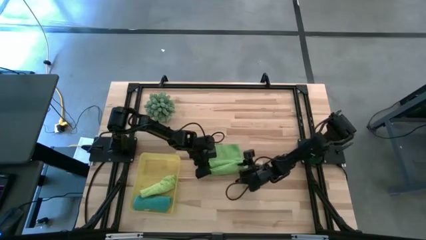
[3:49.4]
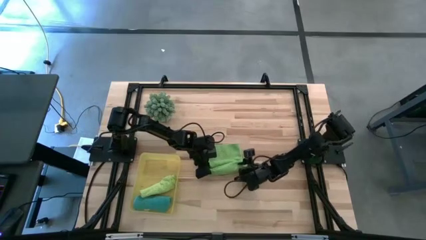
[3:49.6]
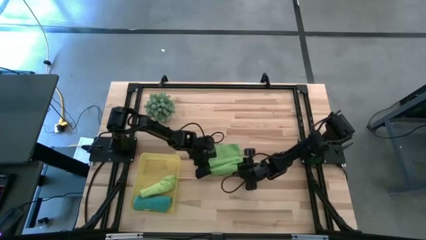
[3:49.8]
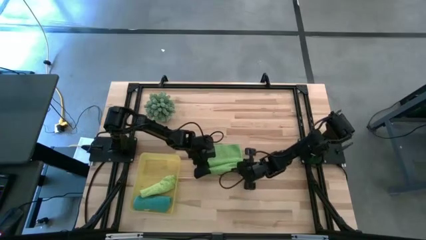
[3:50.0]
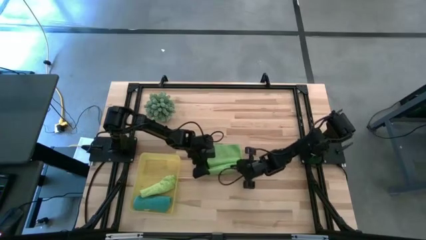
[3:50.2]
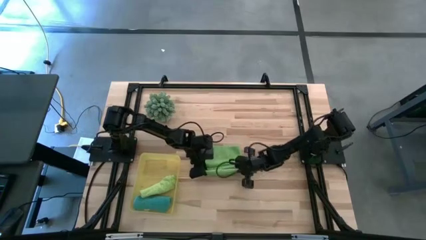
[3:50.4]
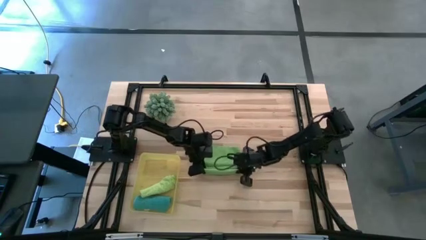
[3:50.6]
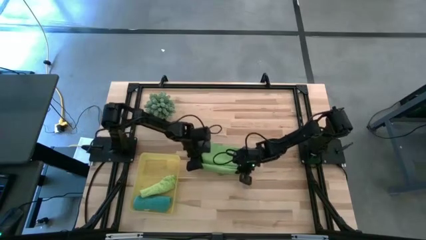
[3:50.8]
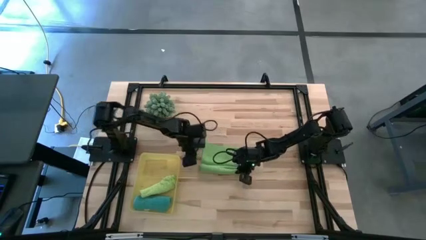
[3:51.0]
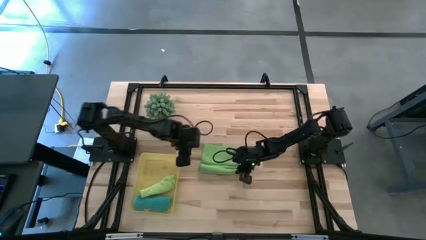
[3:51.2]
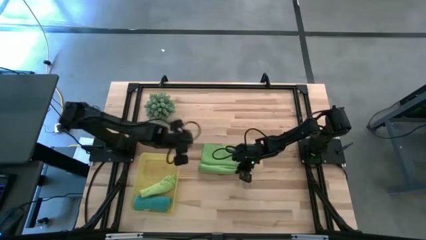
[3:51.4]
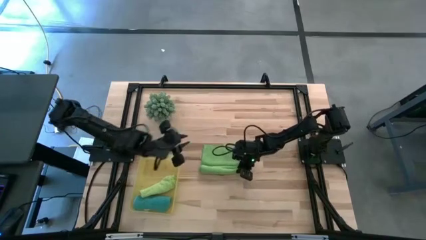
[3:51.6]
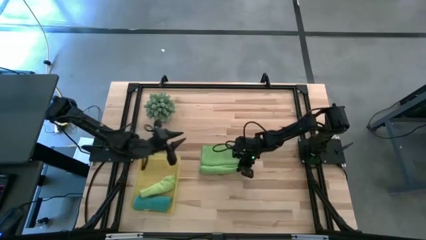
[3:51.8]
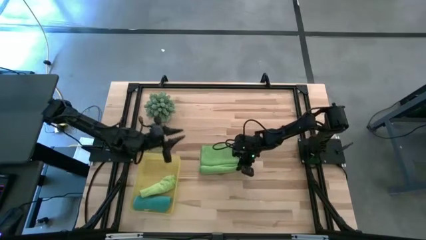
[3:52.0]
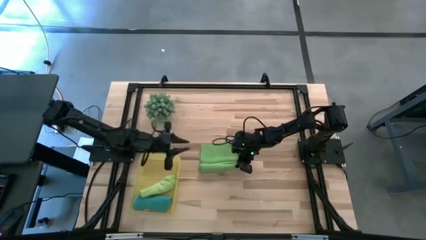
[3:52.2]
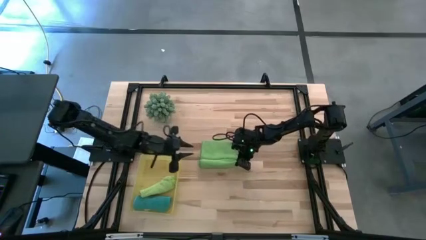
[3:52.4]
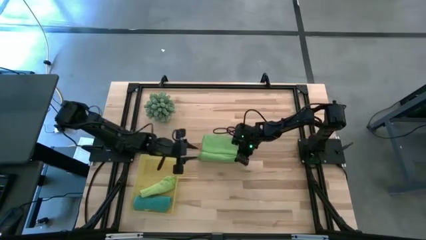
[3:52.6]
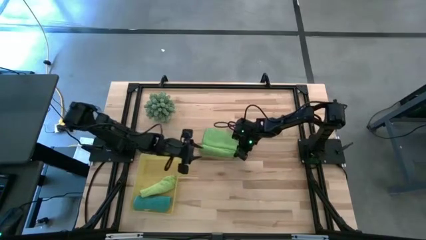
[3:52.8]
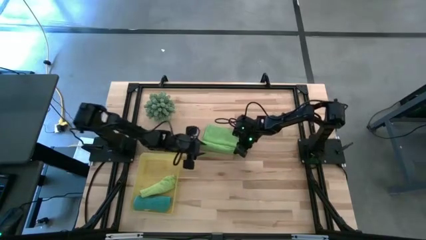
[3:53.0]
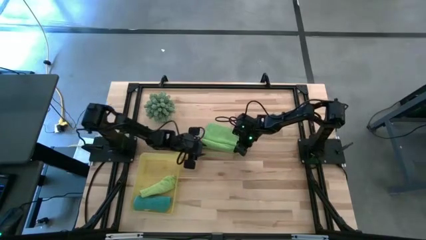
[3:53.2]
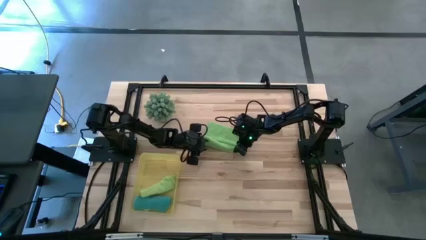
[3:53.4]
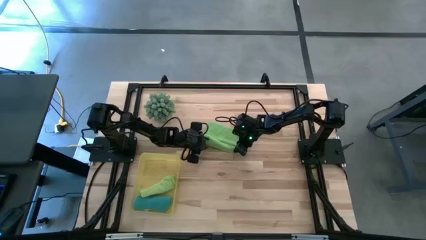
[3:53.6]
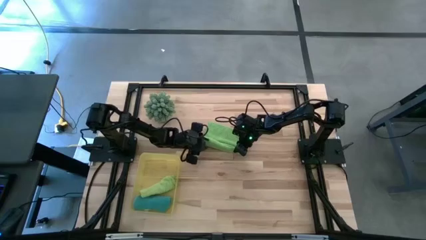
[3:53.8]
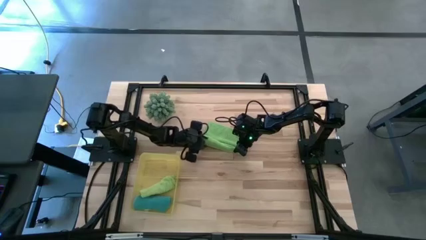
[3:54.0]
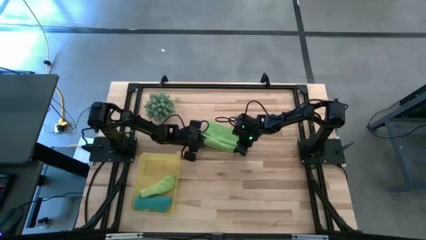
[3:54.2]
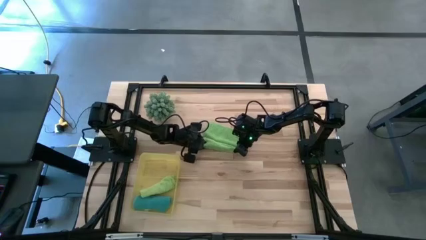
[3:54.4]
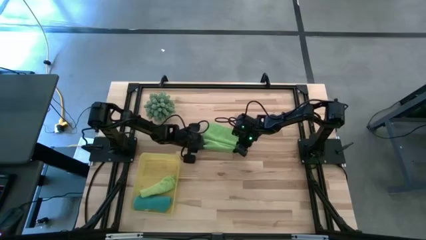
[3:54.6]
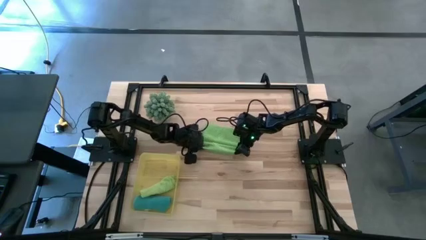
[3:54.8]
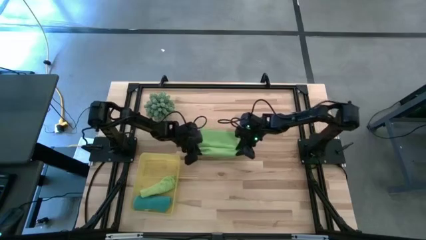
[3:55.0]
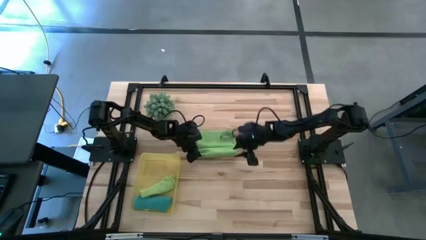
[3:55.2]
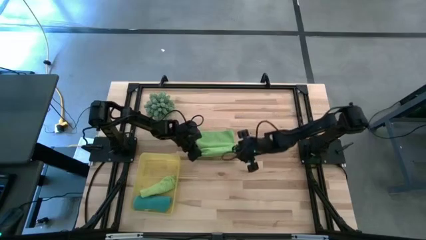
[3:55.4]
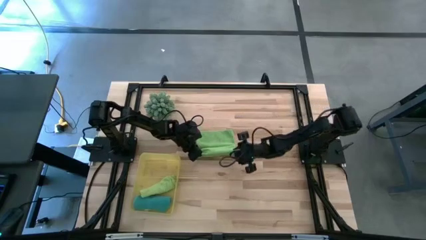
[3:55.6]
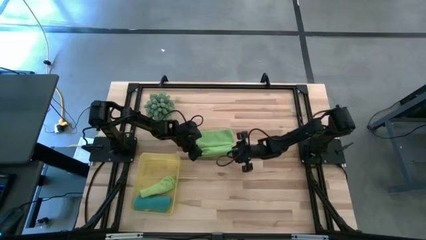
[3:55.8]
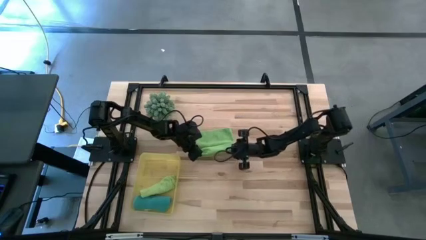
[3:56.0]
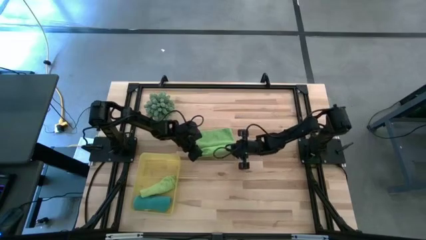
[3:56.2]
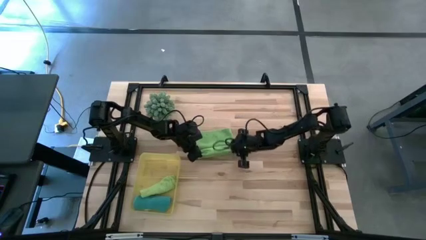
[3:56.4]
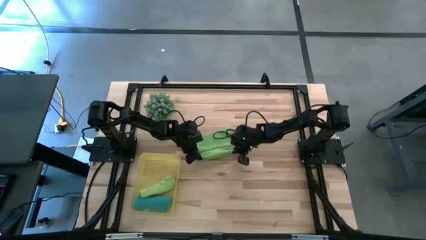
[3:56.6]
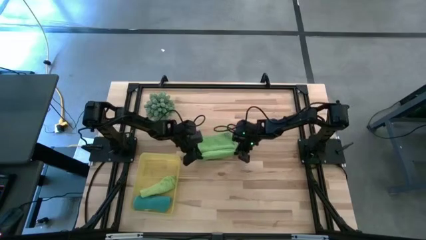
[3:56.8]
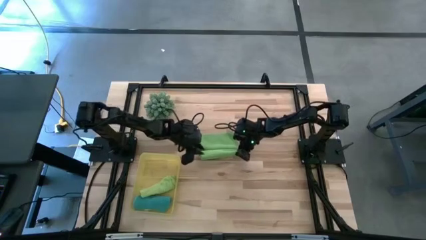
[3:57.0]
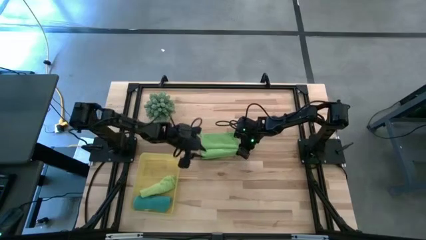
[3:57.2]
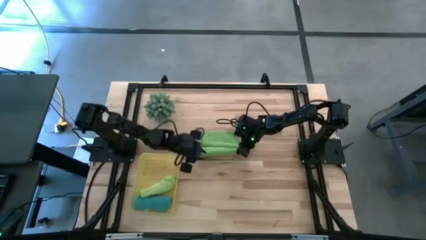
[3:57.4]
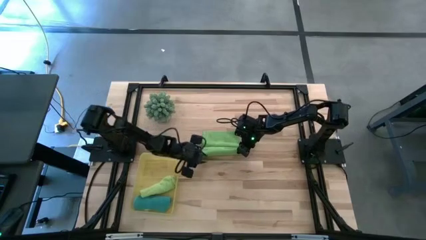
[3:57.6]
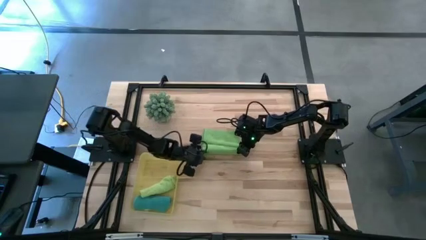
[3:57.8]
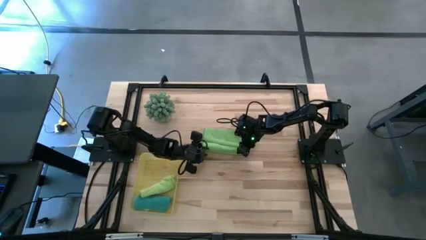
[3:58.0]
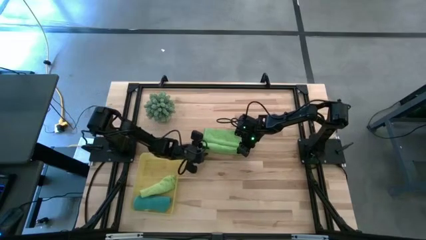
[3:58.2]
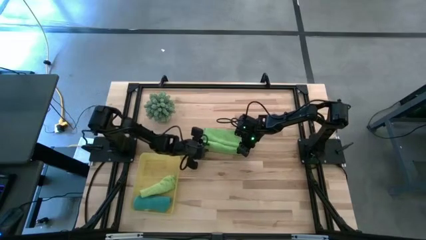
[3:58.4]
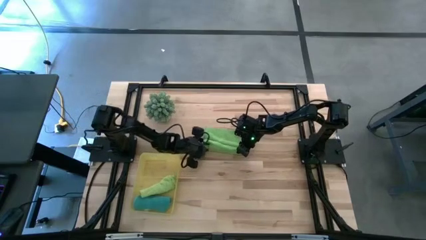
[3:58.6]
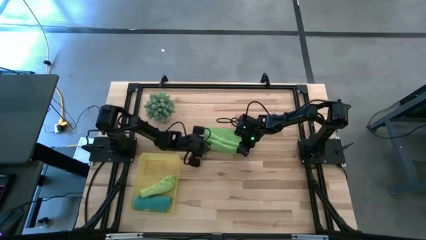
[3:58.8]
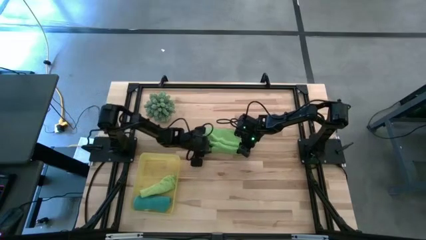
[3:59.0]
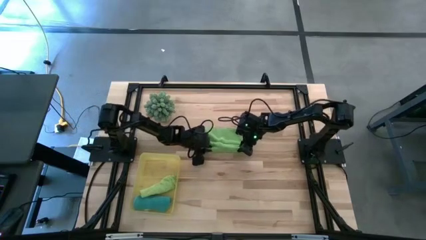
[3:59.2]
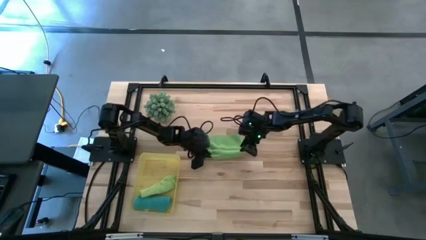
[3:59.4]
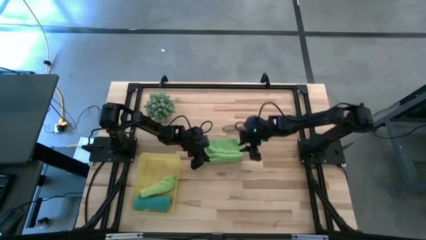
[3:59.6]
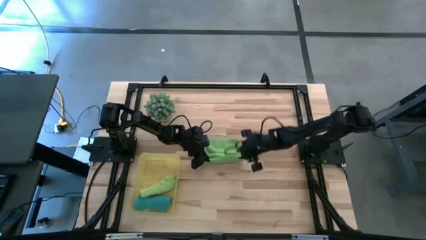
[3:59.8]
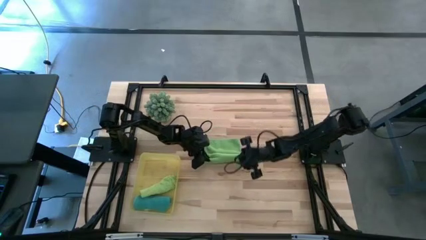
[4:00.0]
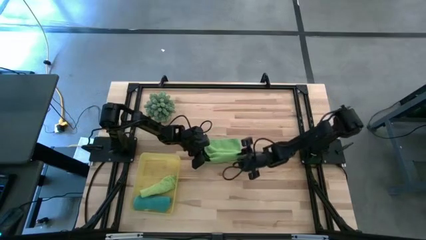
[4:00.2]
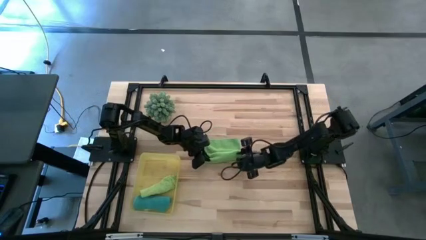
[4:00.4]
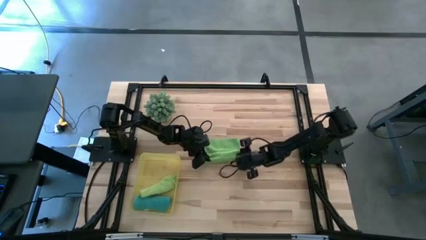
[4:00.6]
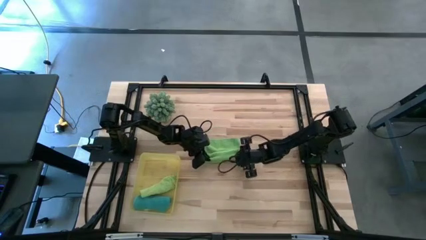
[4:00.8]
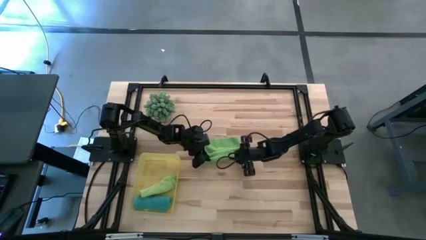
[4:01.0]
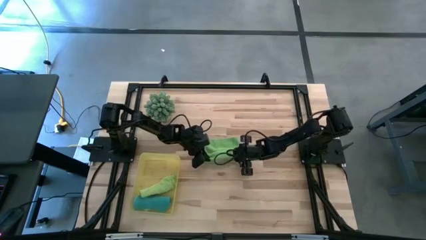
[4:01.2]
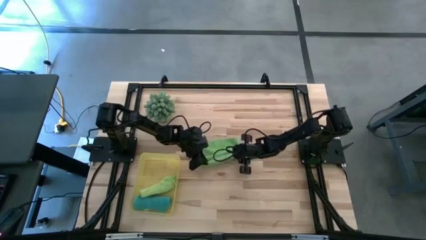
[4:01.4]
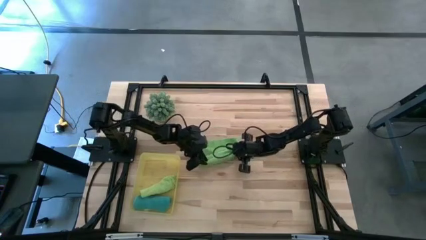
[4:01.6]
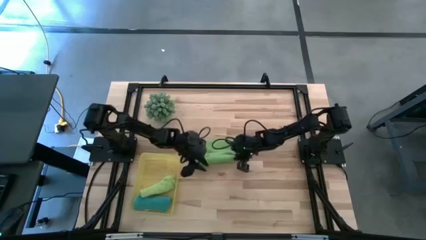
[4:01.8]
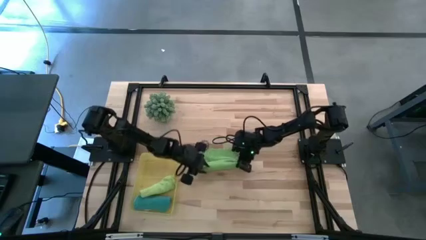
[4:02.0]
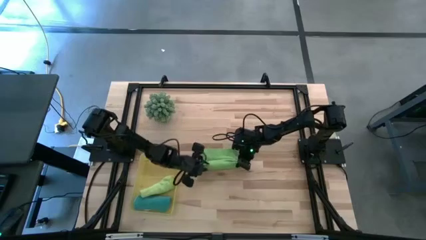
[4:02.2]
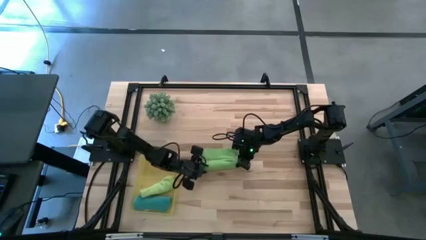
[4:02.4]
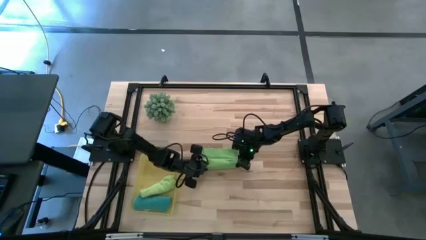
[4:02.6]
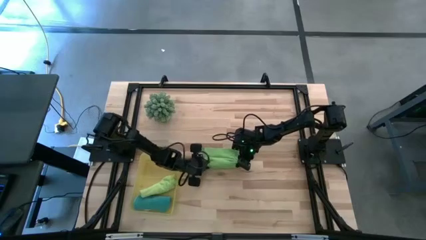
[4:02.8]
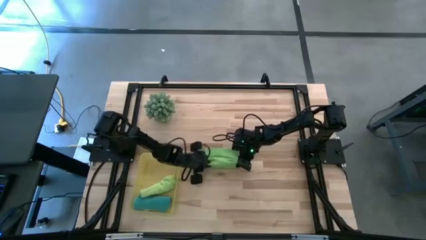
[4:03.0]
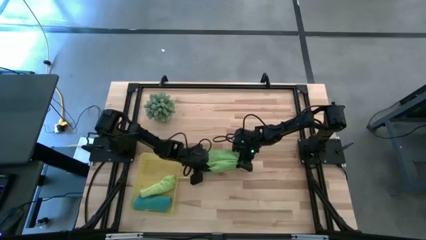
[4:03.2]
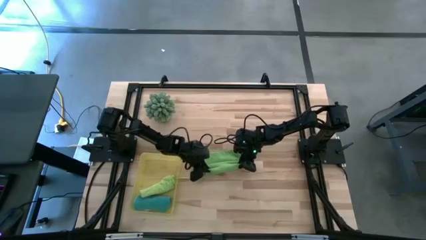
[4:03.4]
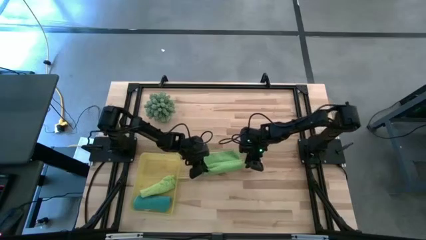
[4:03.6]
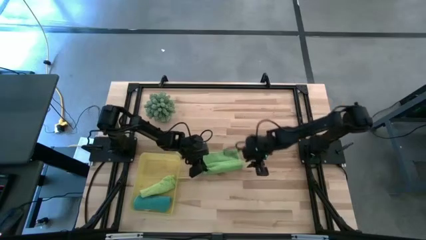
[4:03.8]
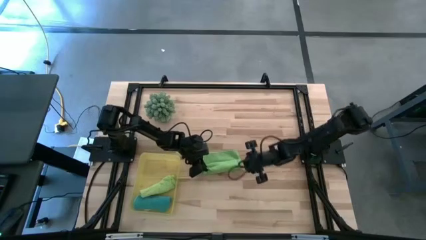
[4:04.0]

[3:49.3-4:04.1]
Task: Roll microfiber towels into tight, uniform cylinder then place into a basket
Roll the green towel

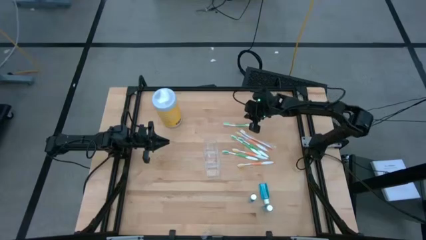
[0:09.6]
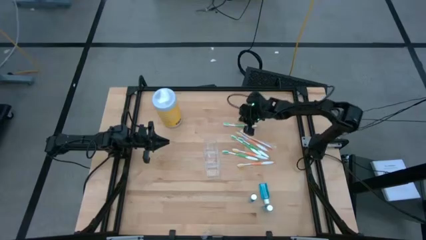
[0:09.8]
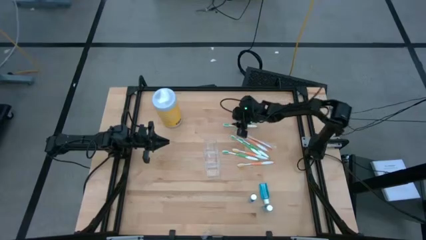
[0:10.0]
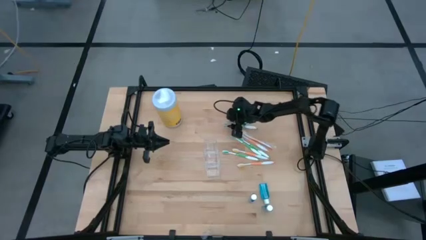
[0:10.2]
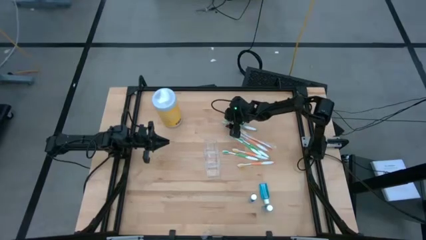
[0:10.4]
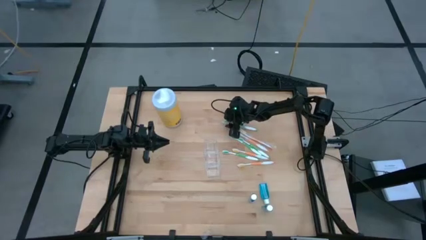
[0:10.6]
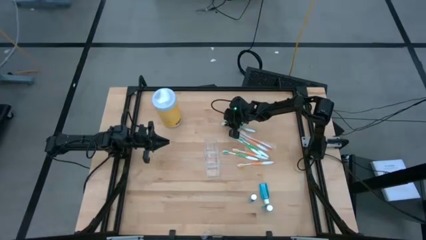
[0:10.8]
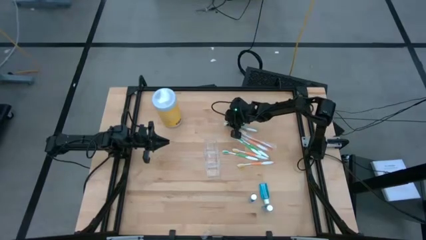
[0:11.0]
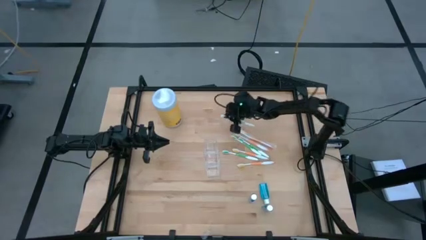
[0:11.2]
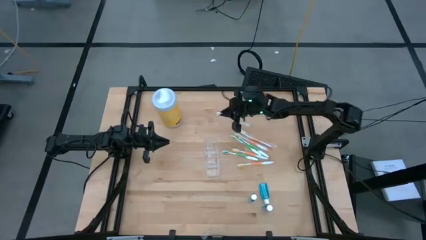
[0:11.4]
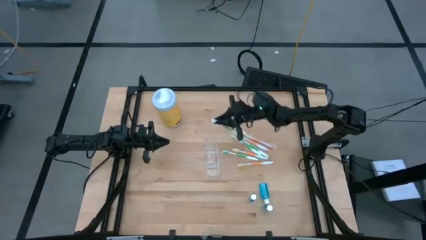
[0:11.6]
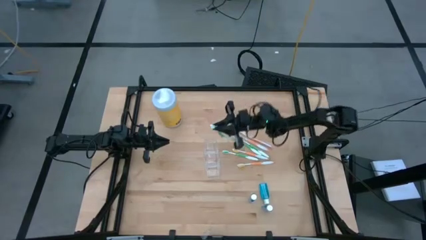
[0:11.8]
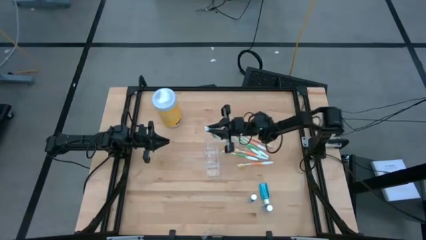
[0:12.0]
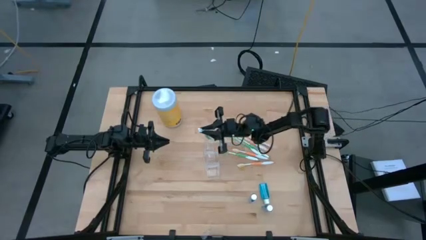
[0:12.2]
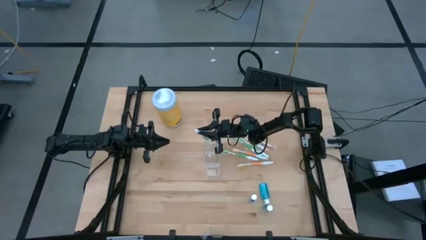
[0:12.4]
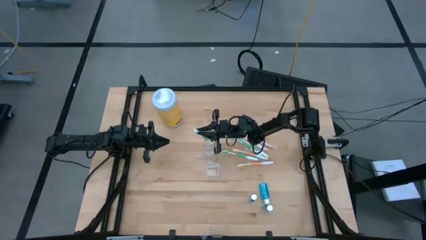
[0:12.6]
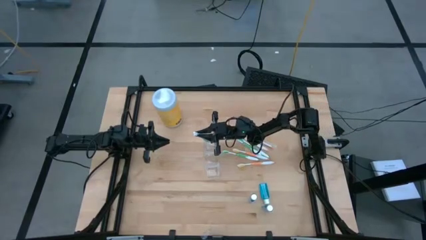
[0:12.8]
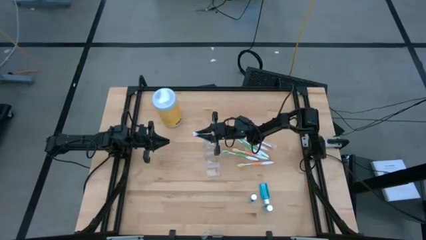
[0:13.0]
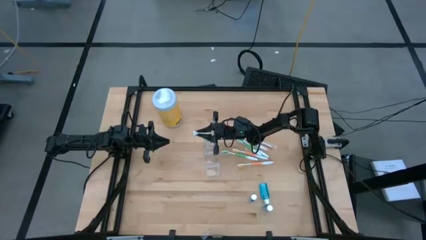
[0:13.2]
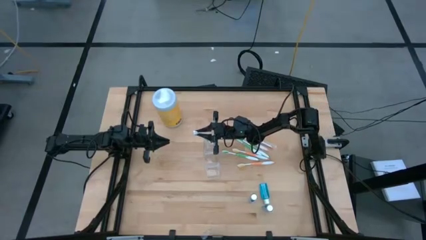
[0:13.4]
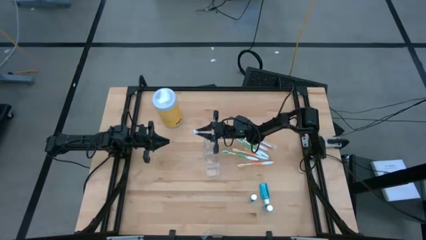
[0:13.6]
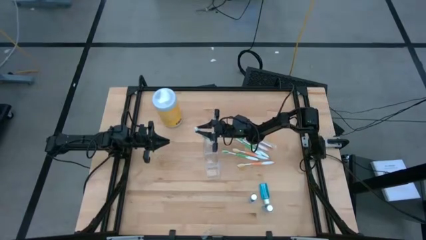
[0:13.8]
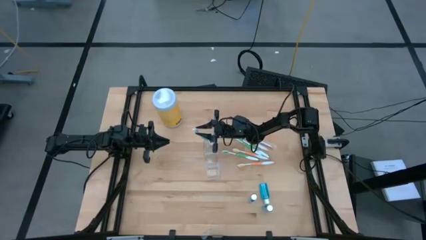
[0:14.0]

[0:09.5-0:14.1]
Task: Pick & Place toothbrushing station
Put the green toothbrush into the transparent organizer
